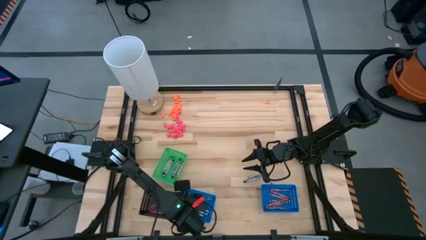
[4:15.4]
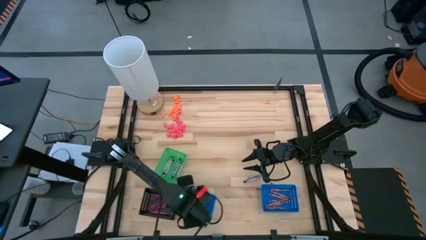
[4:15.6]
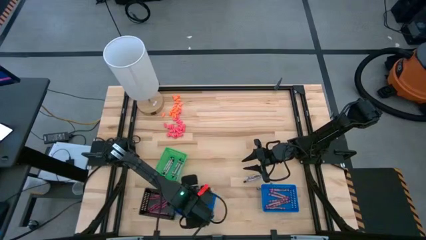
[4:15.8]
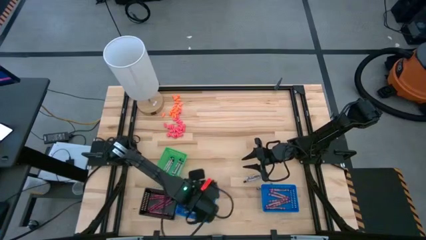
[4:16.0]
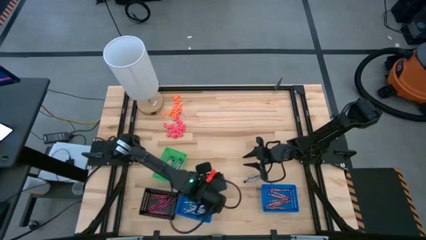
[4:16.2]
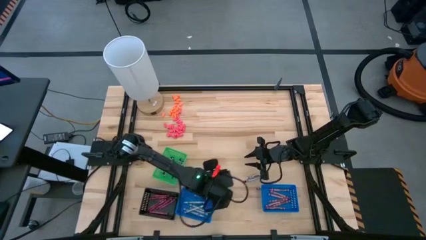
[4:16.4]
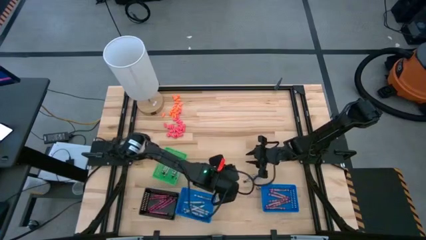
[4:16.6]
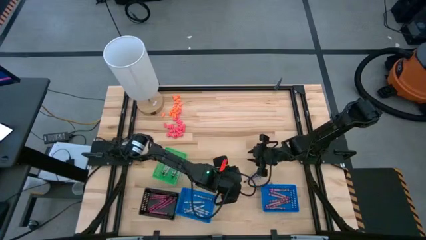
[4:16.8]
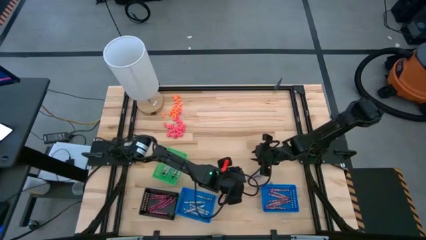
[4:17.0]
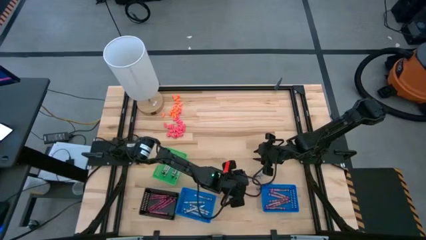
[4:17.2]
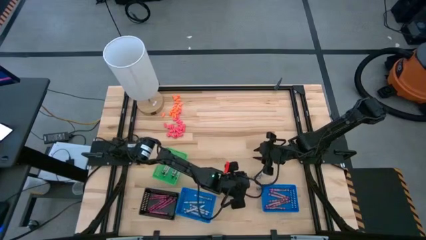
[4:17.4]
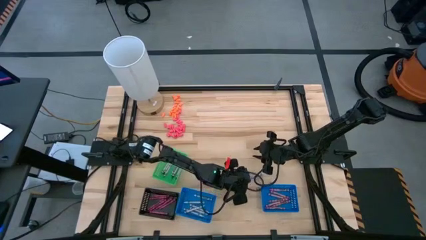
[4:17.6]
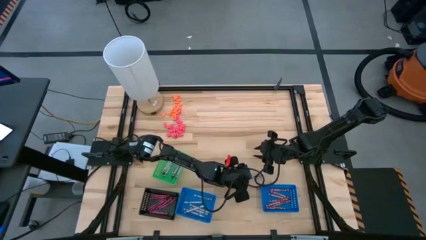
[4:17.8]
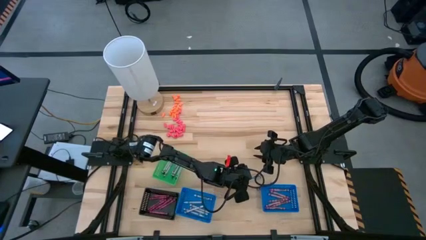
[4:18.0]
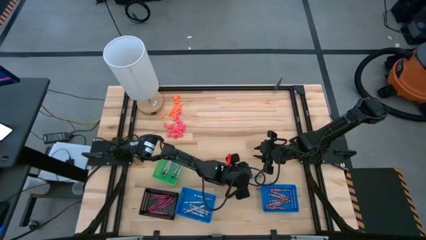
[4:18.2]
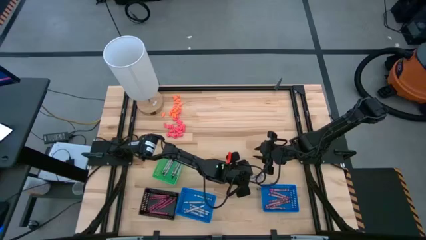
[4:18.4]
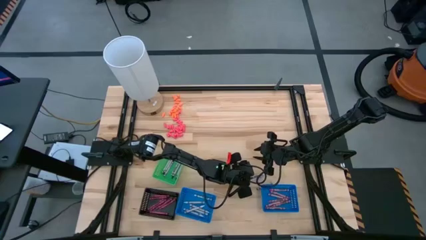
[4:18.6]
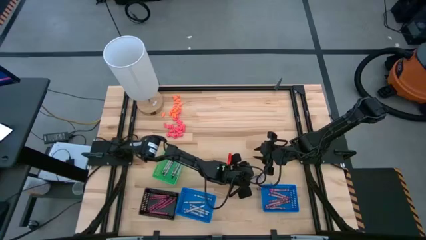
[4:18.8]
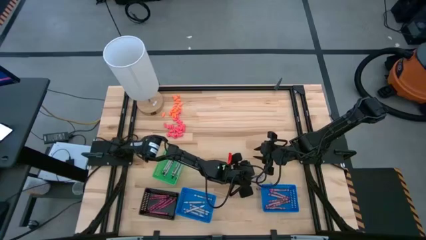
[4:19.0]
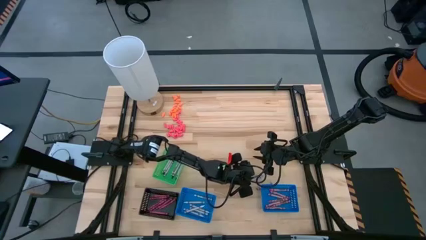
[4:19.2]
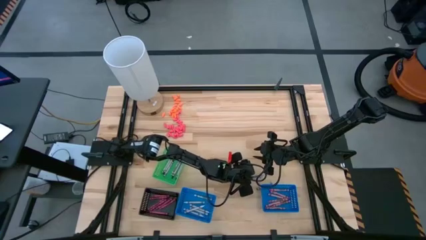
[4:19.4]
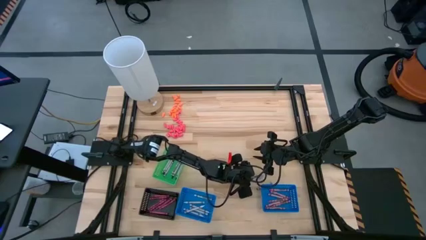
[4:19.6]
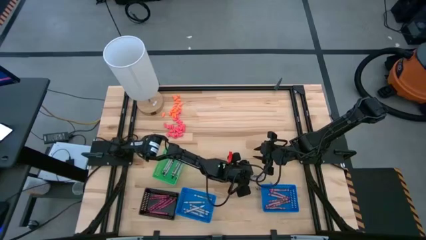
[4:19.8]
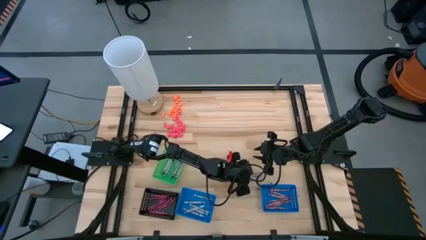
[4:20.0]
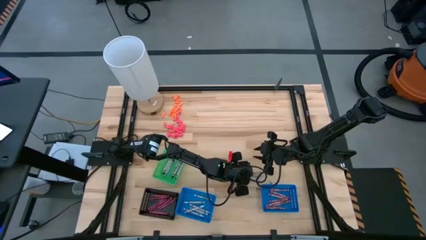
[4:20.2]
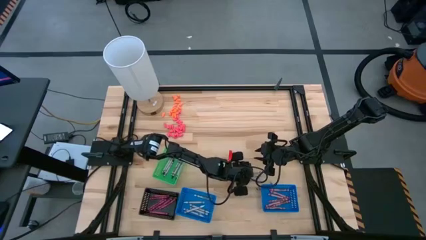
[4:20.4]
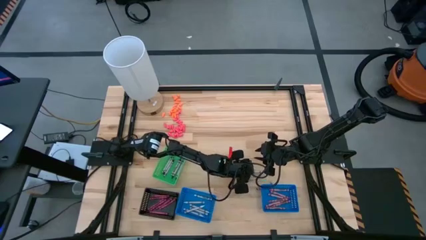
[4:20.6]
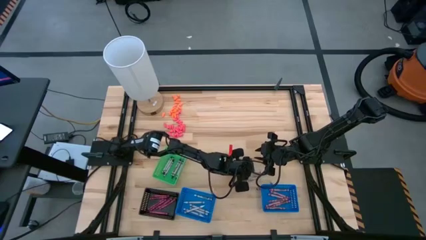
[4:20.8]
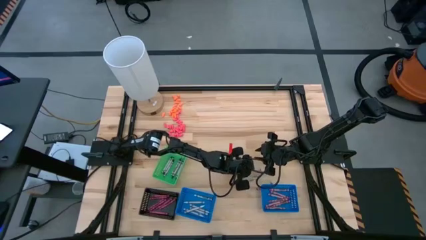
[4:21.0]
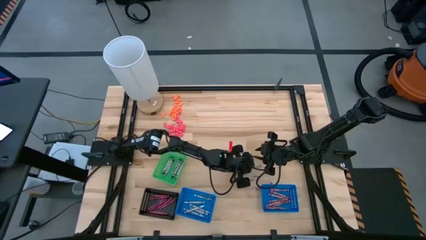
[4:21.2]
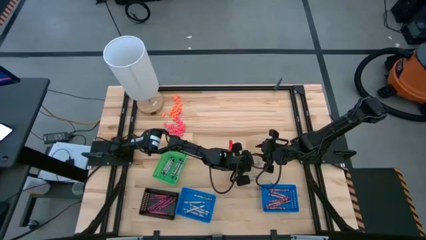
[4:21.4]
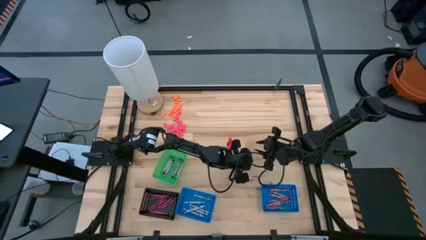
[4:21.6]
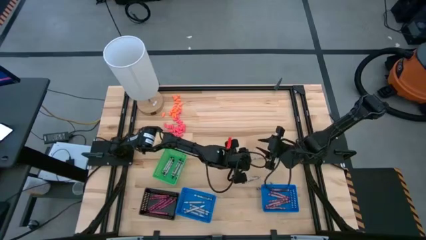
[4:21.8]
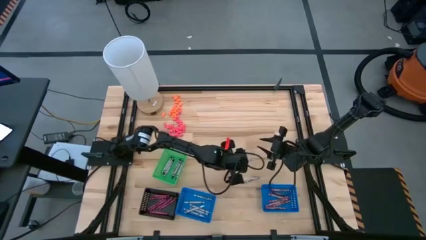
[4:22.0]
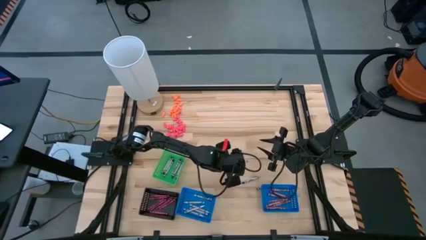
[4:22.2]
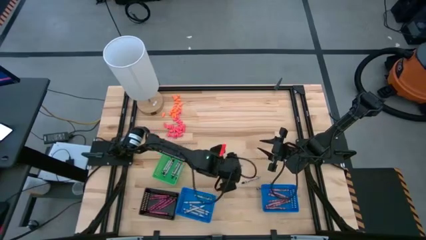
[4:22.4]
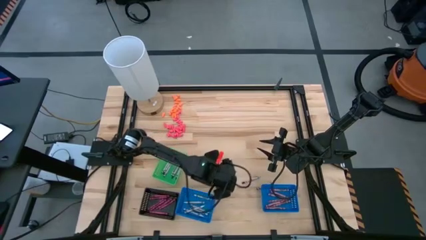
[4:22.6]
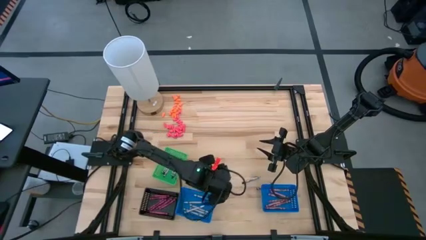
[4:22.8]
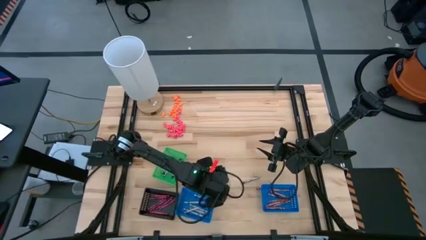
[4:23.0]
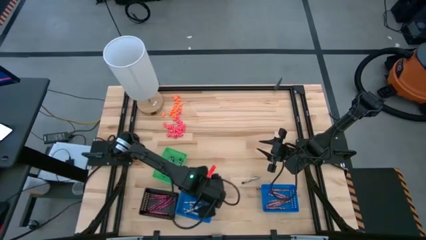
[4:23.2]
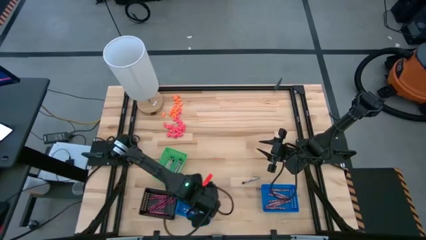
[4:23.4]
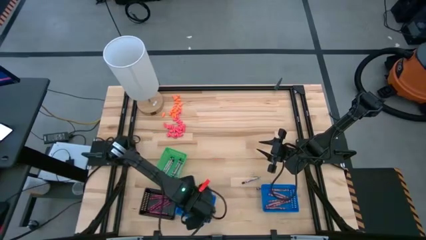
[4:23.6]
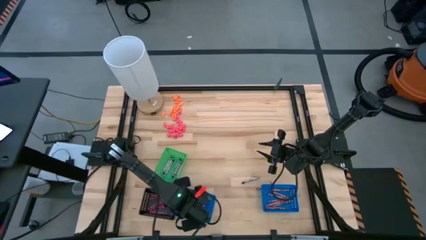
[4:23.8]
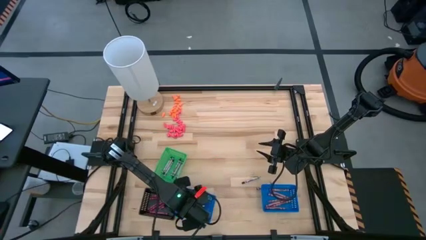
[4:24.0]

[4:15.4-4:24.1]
Task: Sort crayons
Put the white crayon into the left blue basket

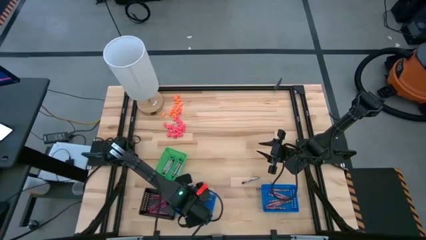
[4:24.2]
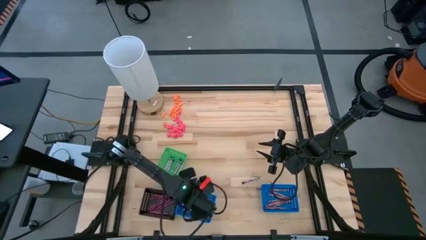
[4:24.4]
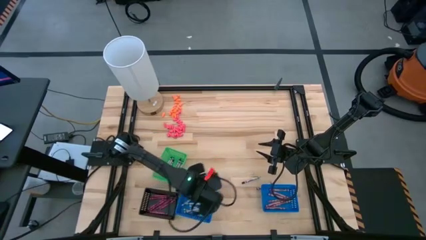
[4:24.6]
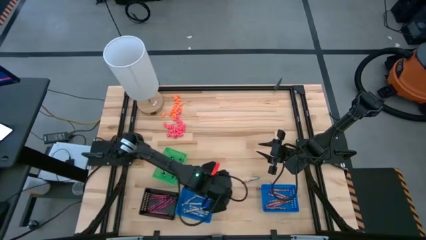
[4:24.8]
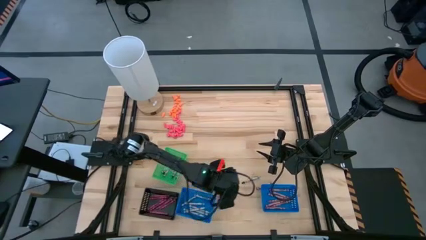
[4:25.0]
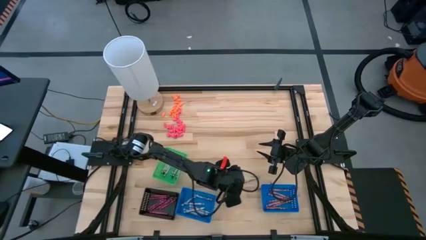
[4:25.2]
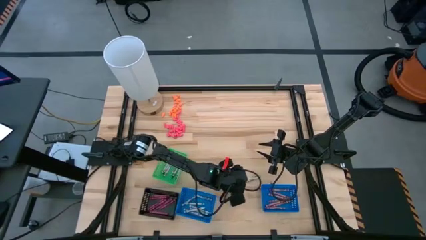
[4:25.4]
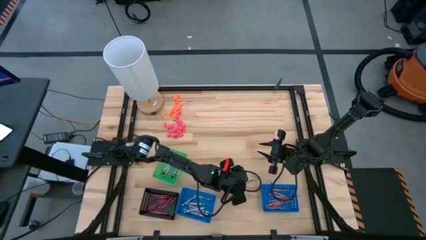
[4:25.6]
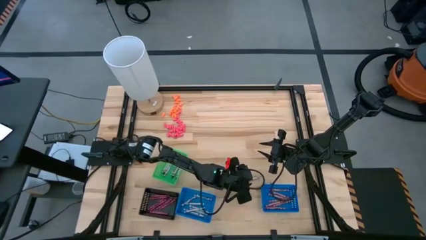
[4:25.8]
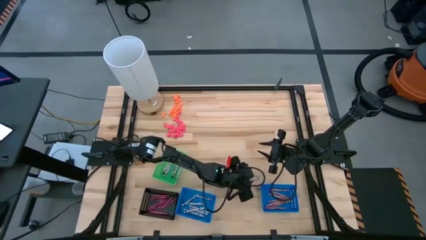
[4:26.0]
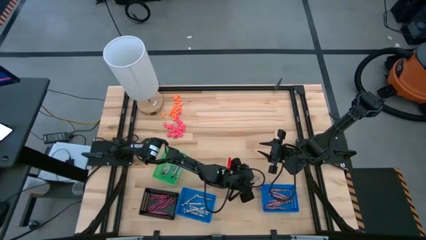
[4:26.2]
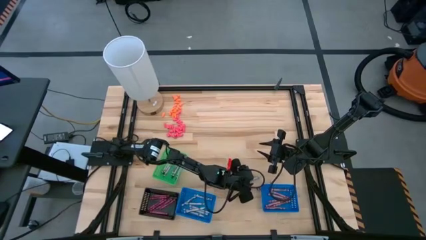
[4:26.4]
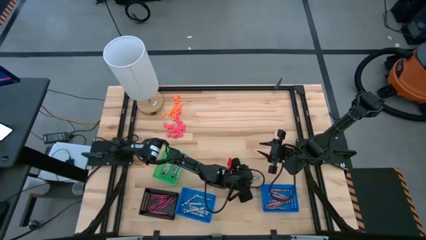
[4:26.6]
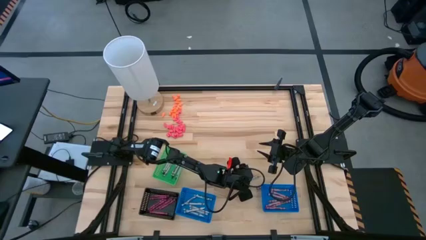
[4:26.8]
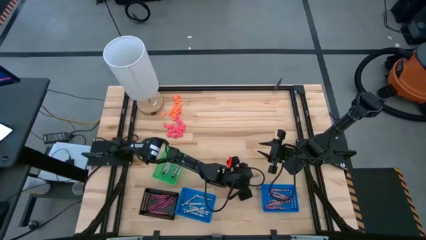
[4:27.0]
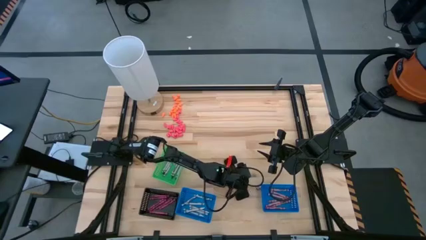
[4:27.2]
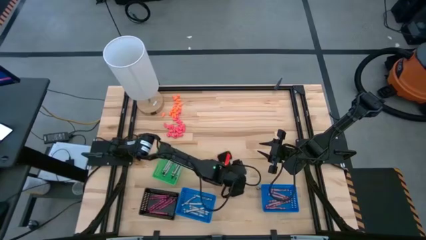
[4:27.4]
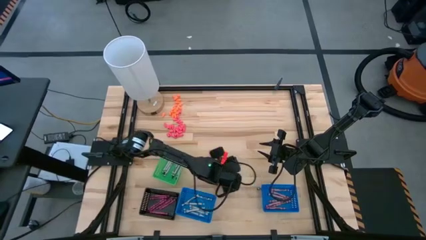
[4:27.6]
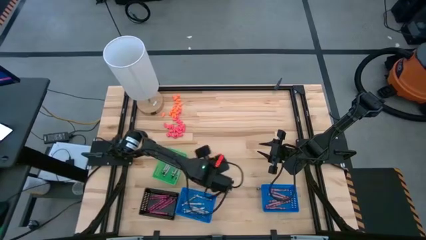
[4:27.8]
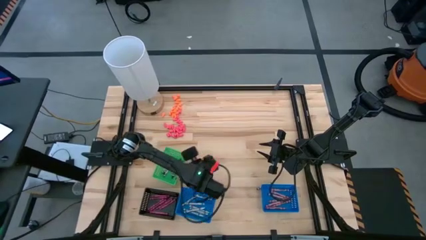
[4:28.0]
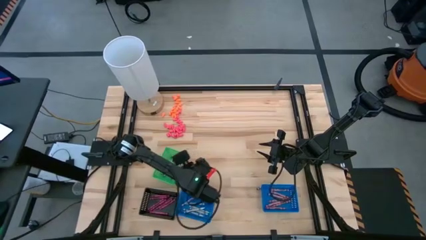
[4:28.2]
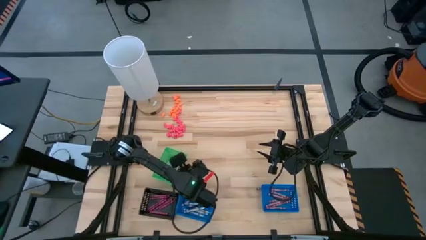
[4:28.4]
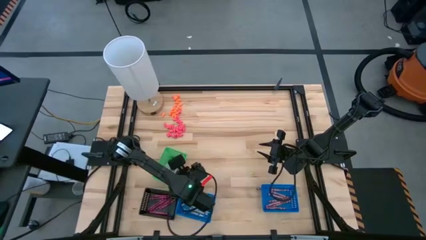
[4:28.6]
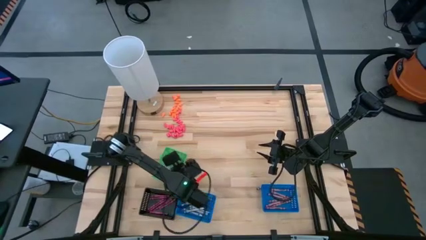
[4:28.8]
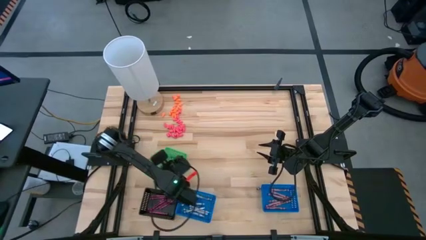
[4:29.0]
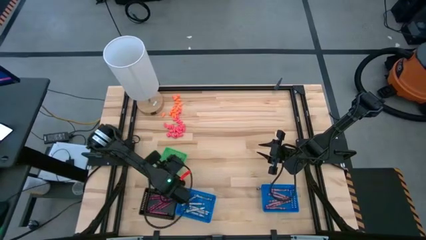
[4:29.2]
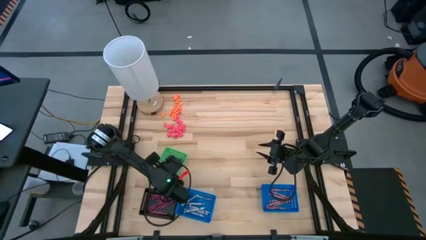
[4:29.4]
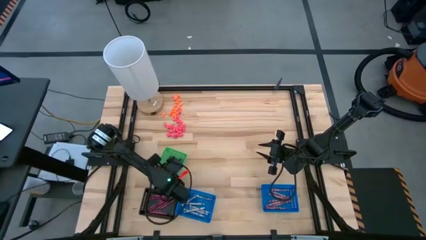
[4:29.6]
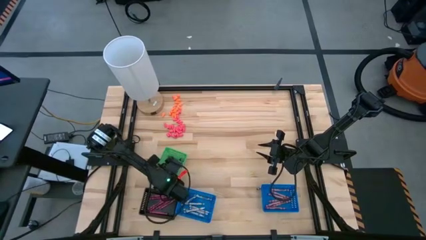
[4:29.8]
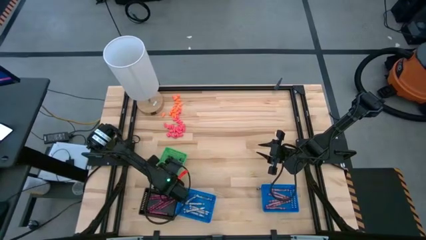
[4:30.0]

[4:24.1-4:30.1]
Put the black crayon into the green basket
